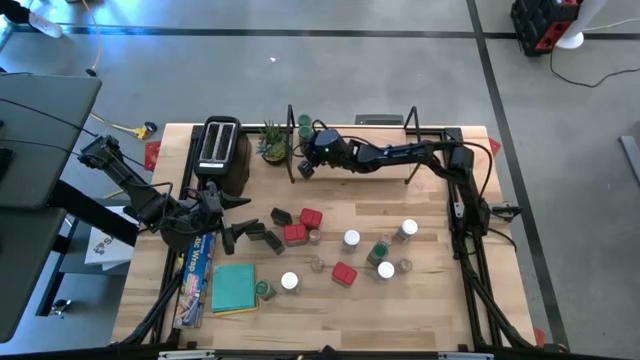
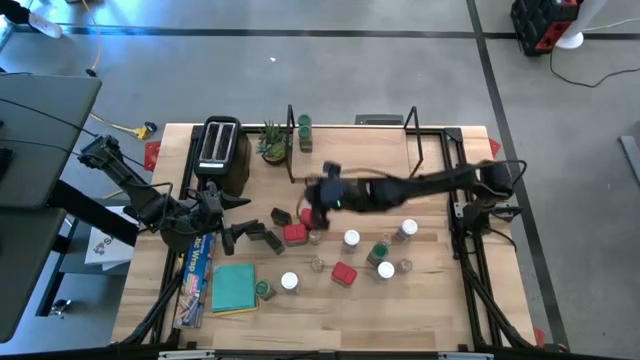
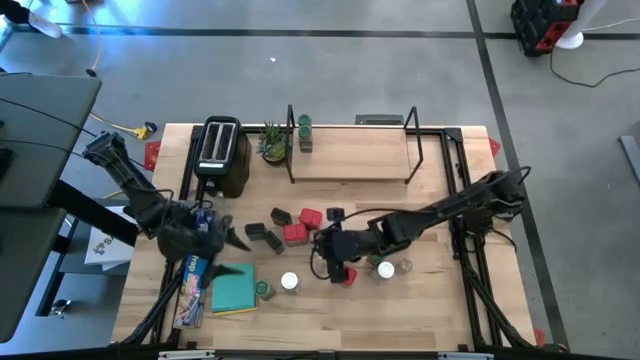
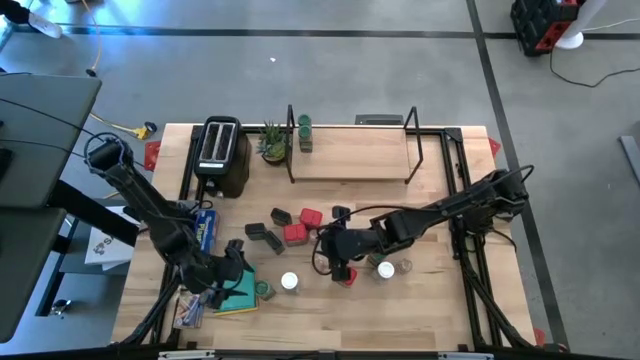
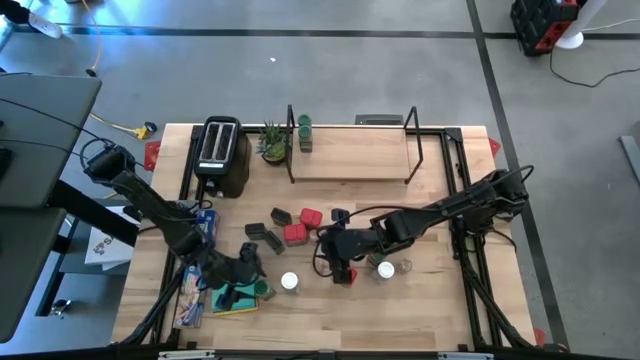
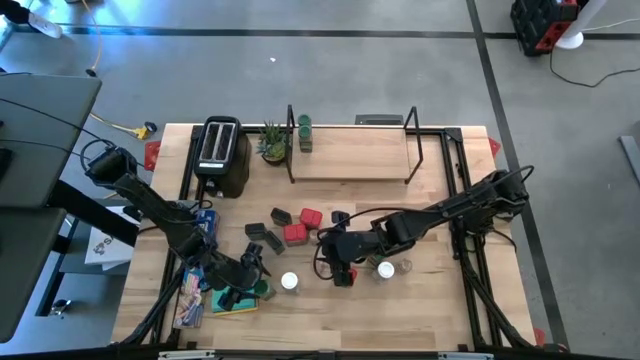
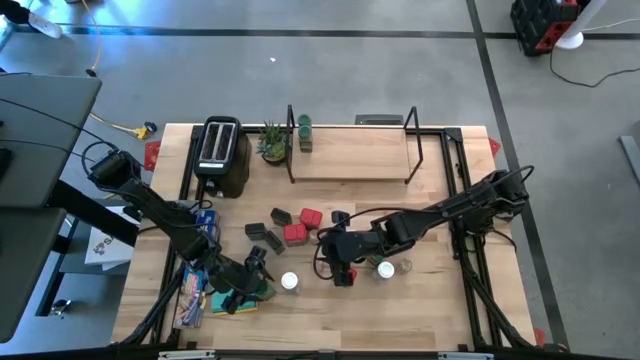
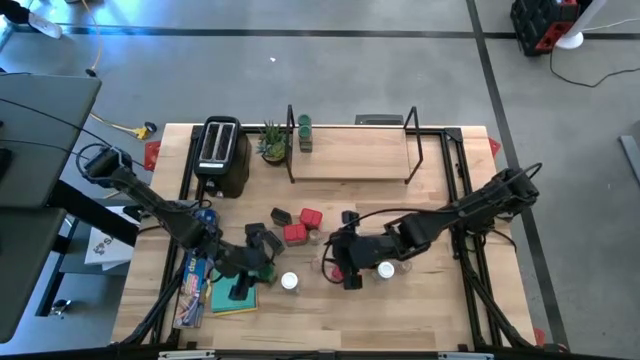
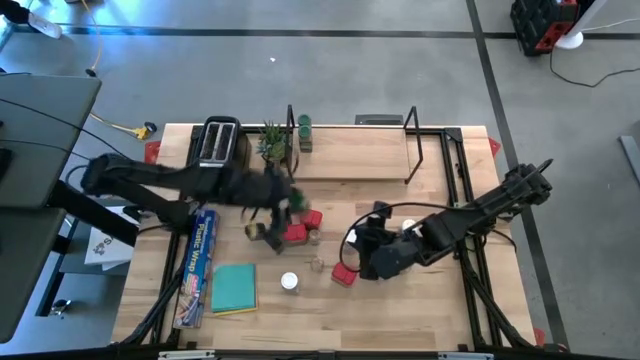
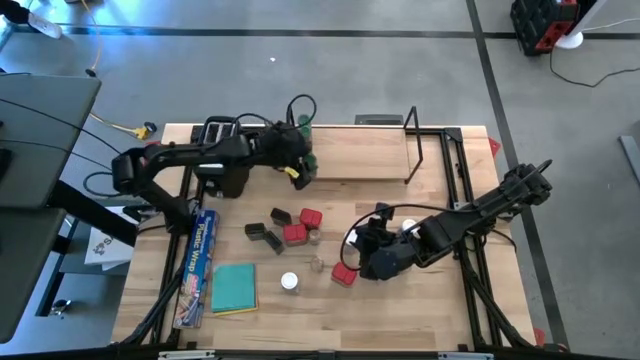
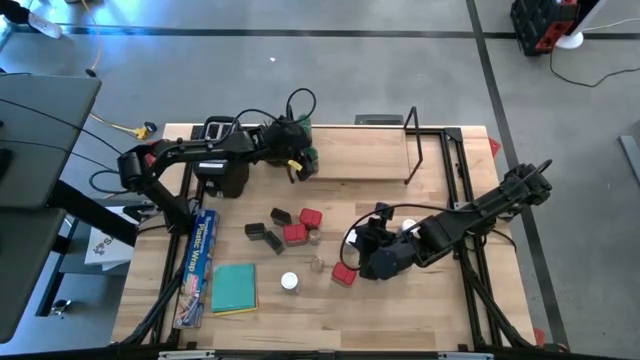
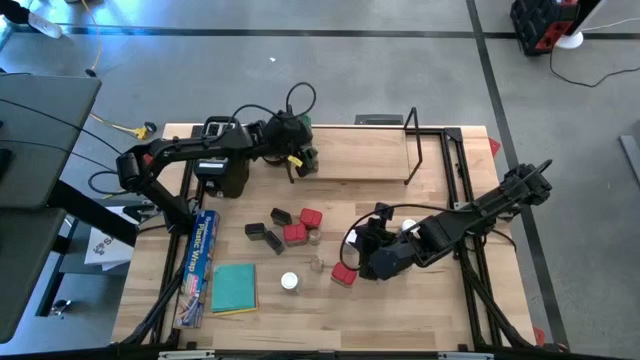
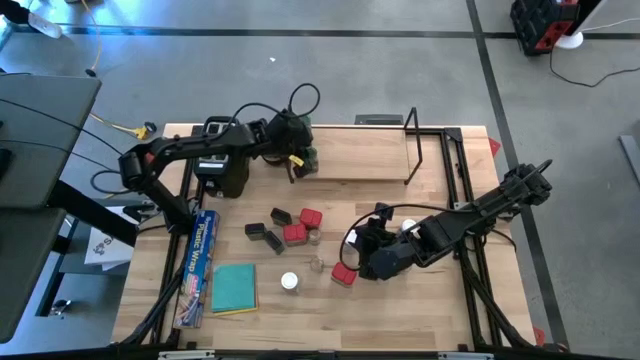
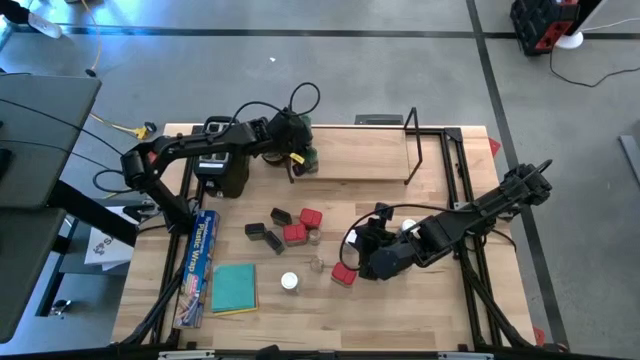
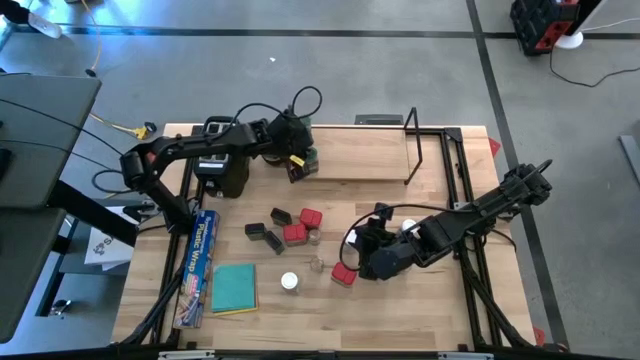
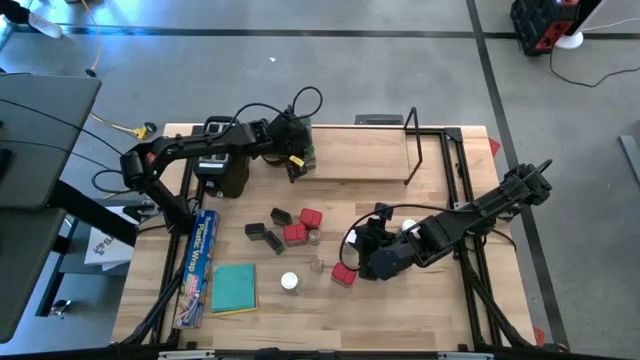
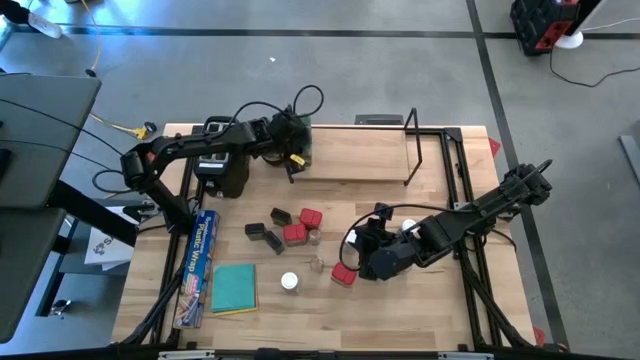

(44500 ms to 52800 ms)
Task: Shelf spices
Put the left green seasoning bottle on the shelf aligned with the other green seasoning bottles

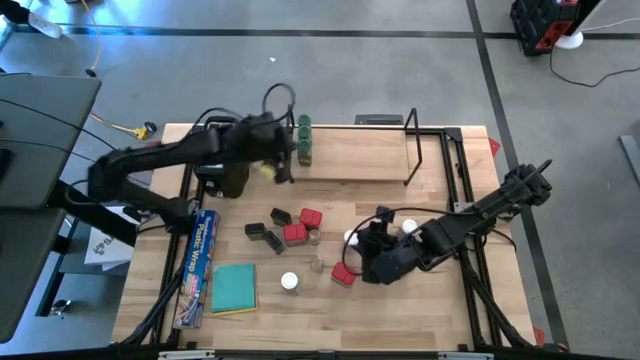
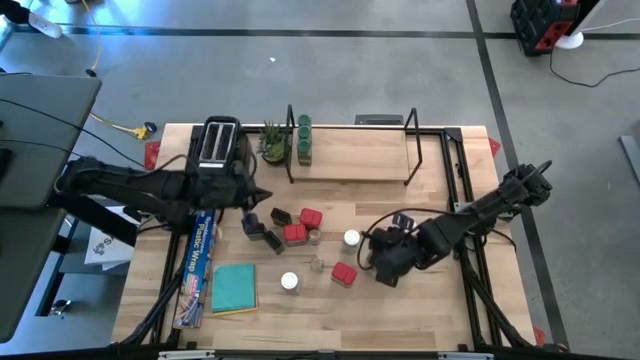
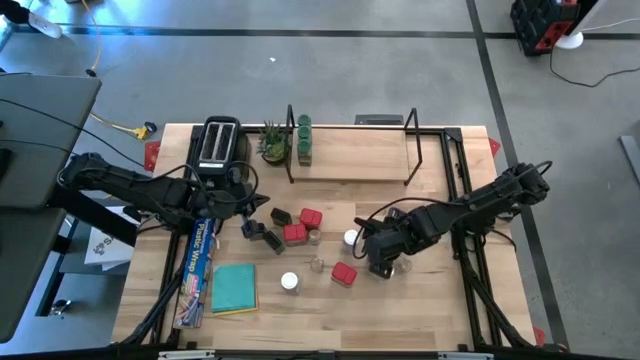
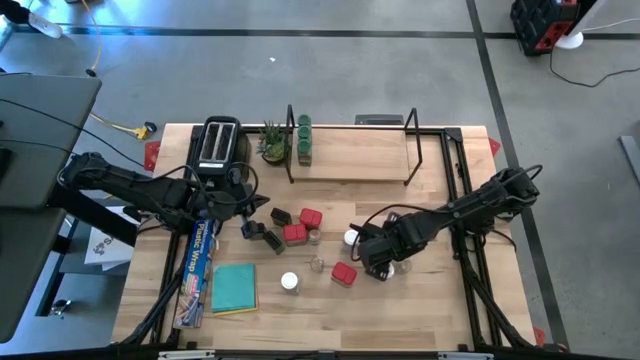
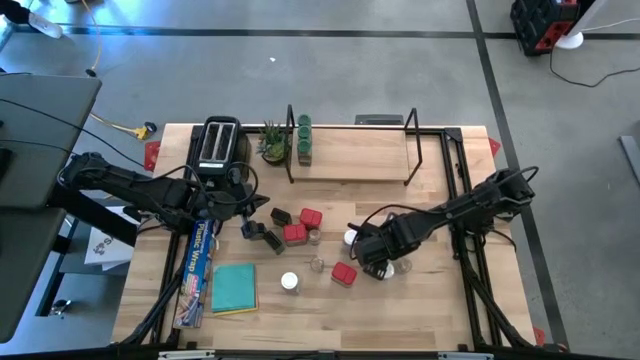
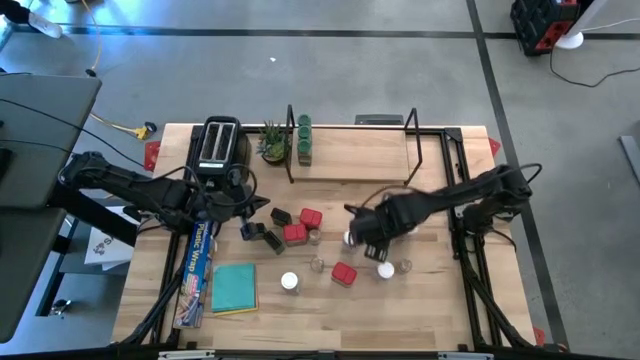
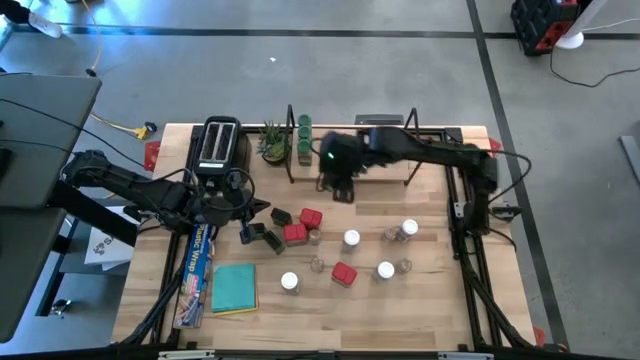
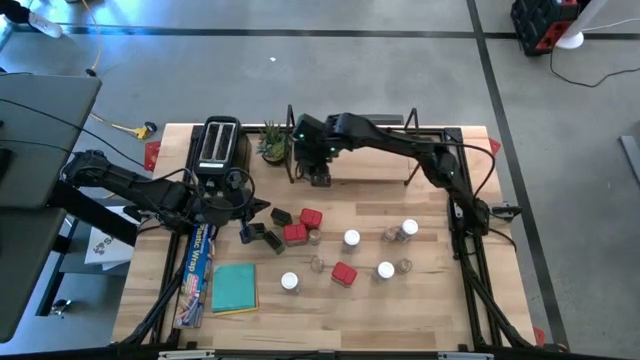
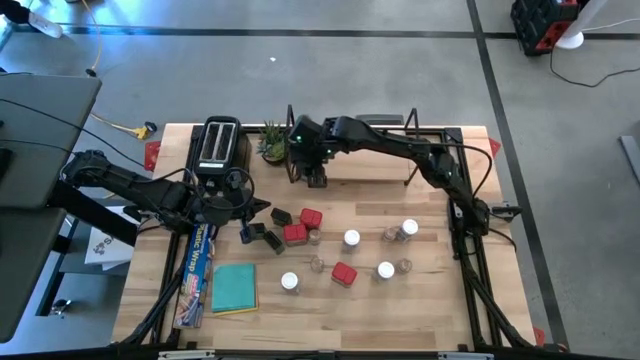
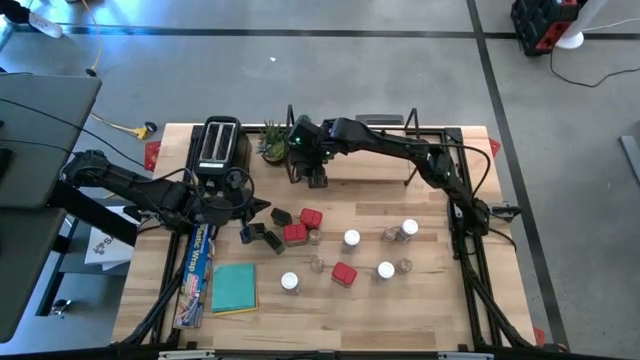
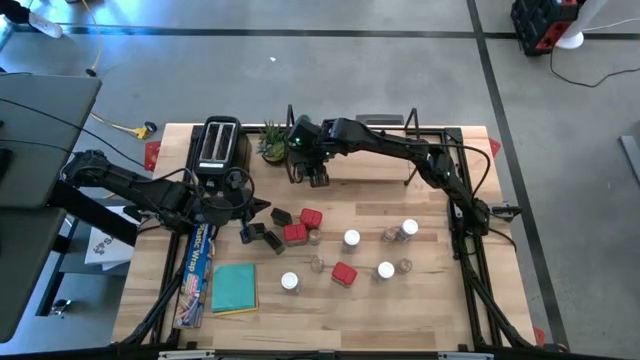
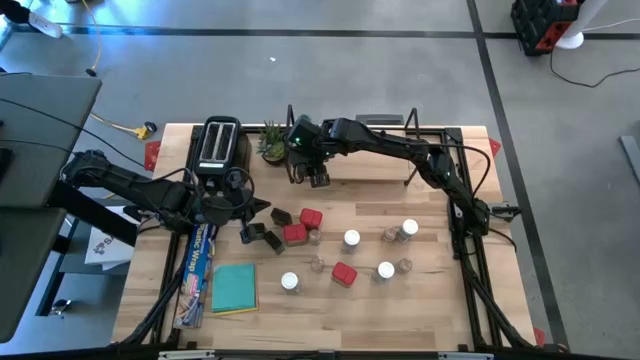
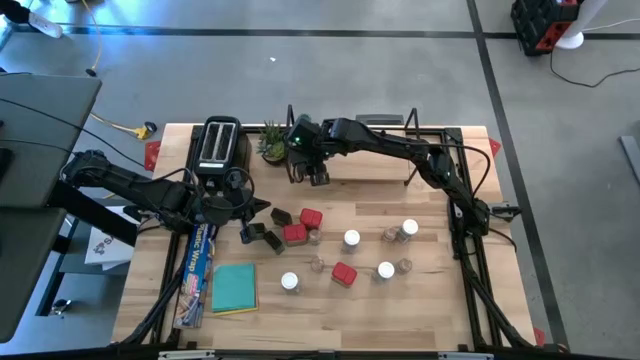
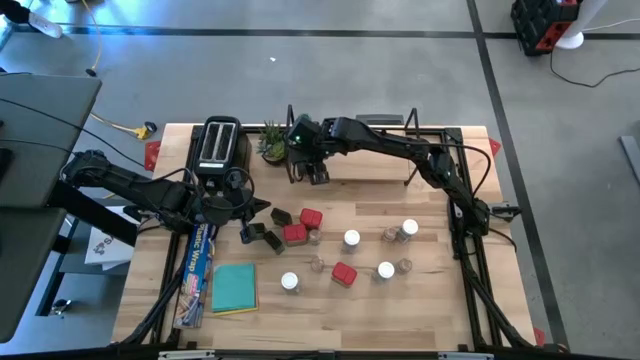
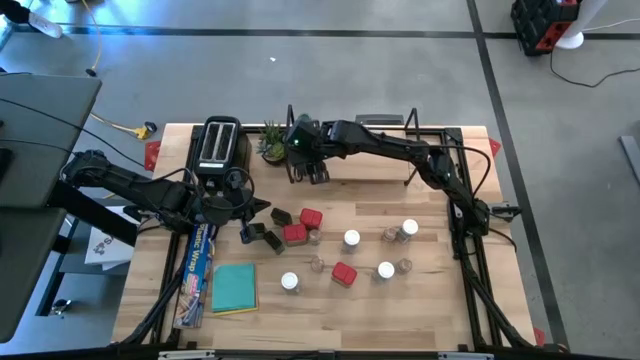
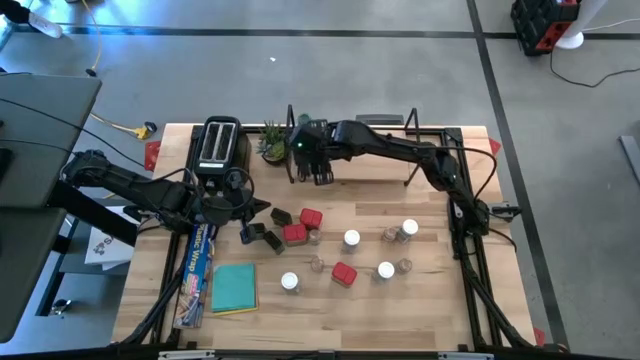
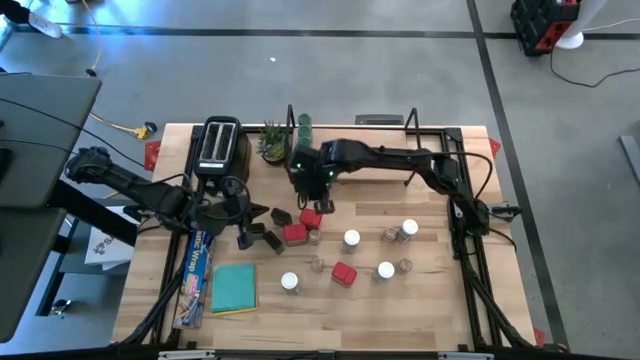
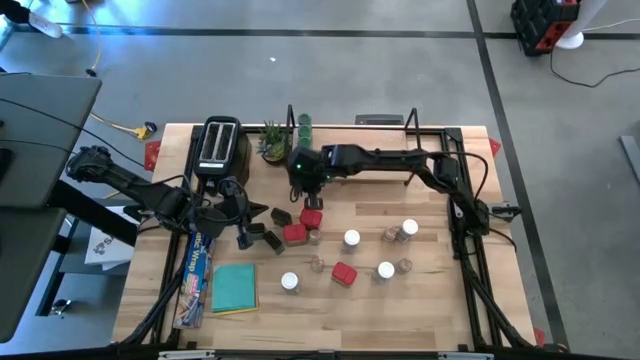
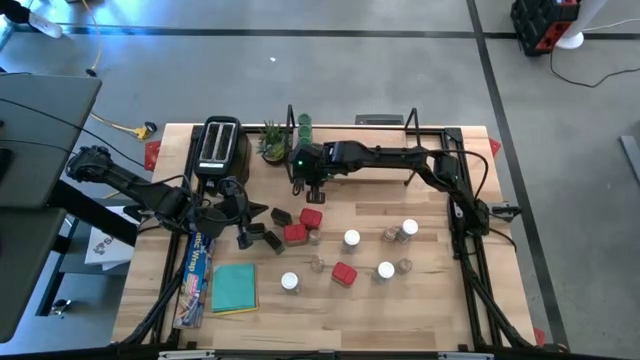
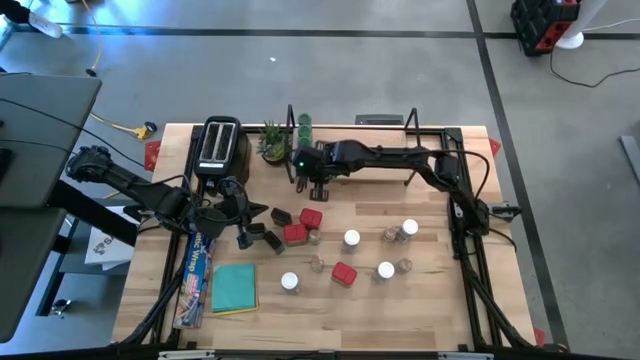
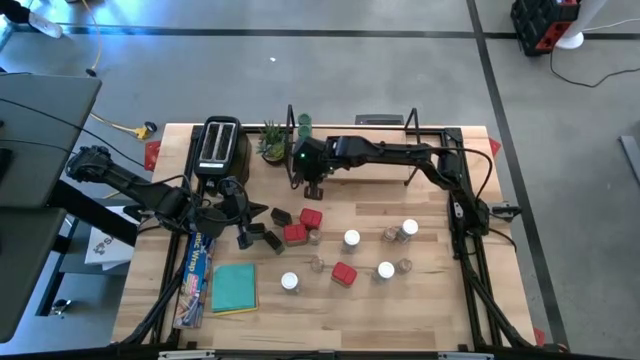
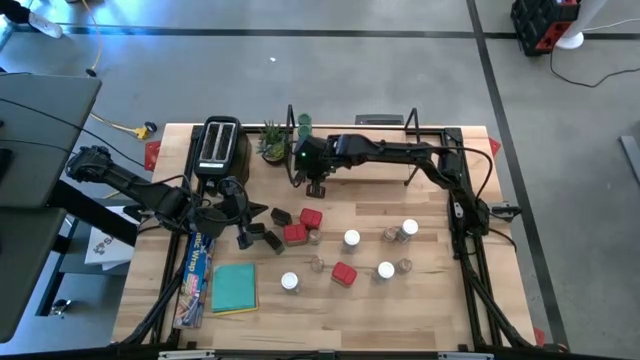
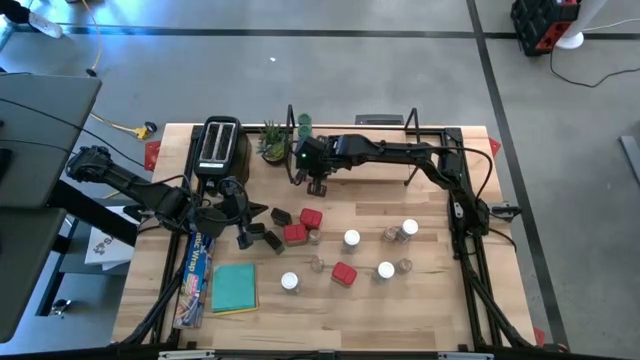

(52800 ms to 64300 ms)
Put the green seasoning bottle on the shelf aligned with the other green seasoning bottles

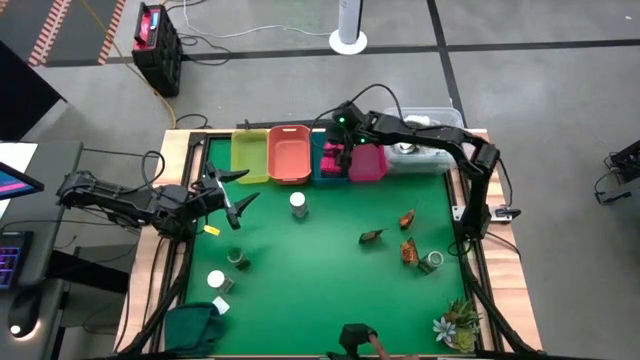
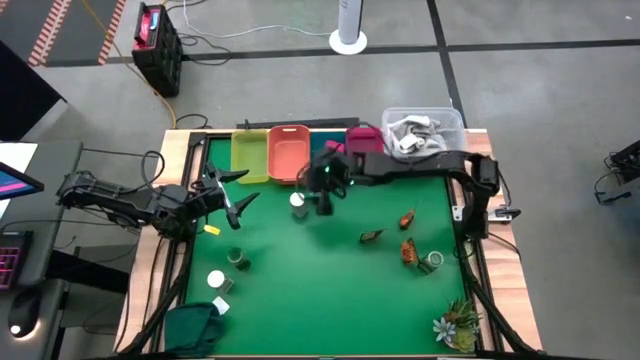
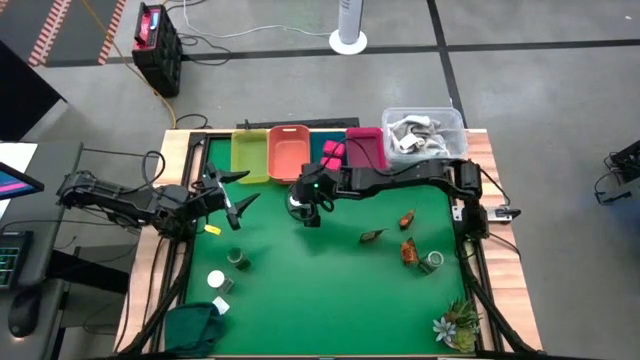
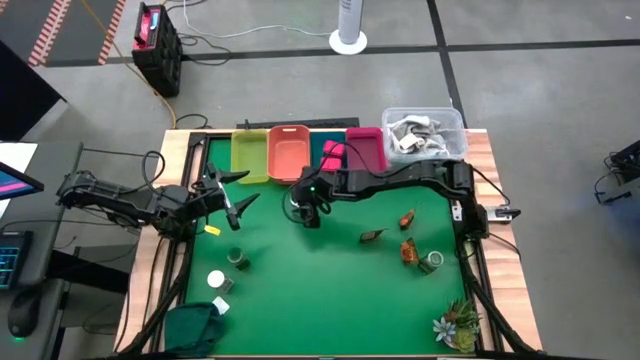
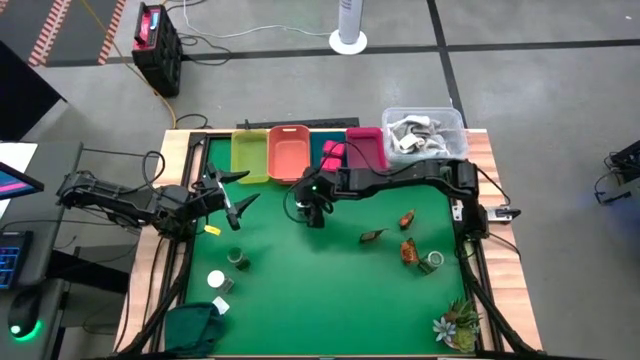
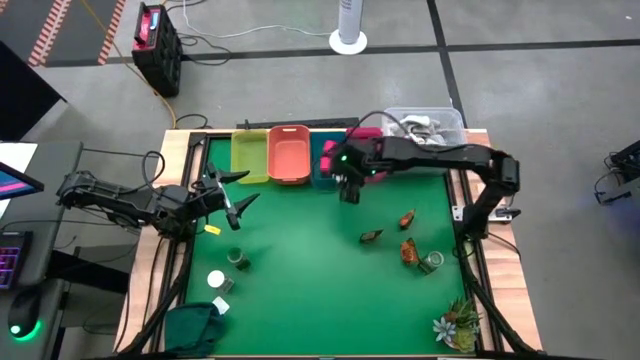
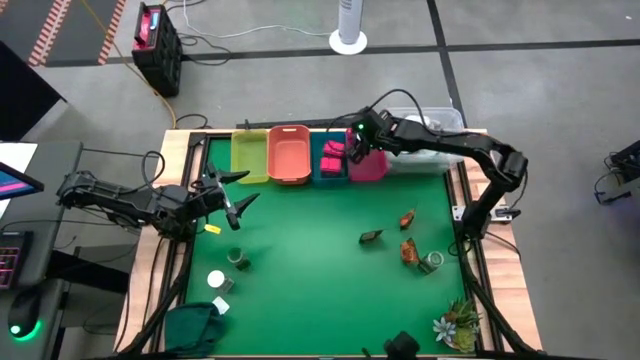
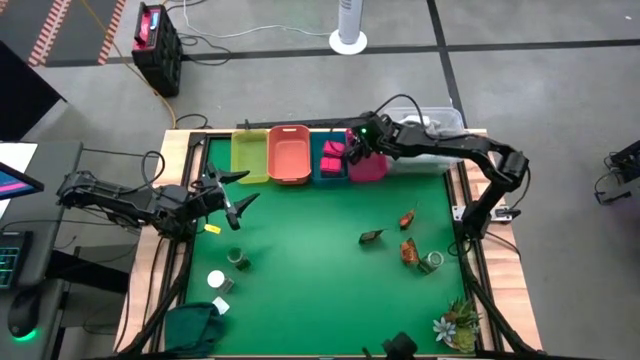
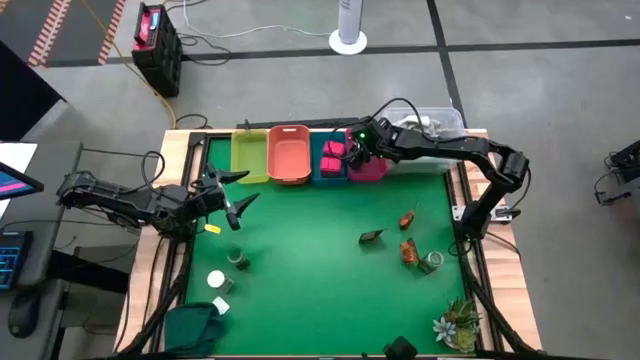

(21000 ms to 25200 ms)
Task: Sort spices by type
Put the top white seasoning bottle into the red bin
